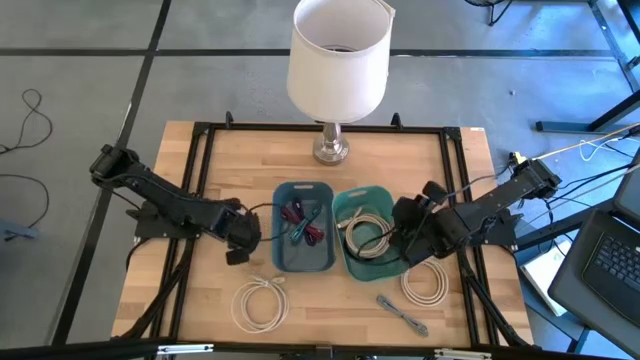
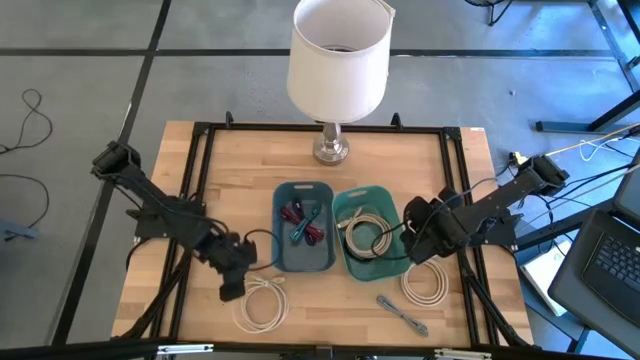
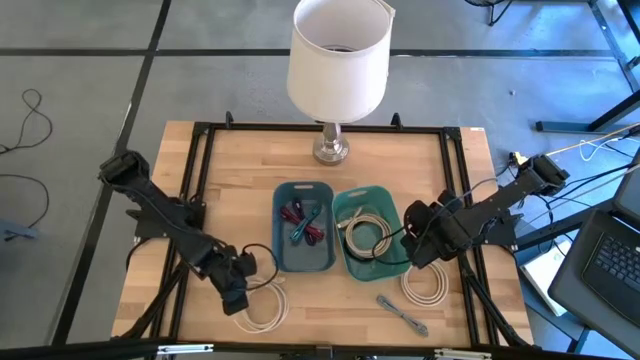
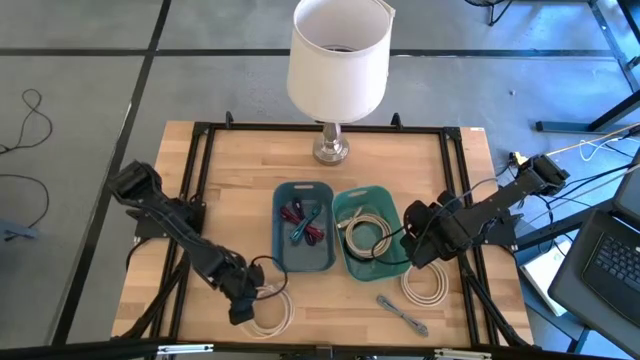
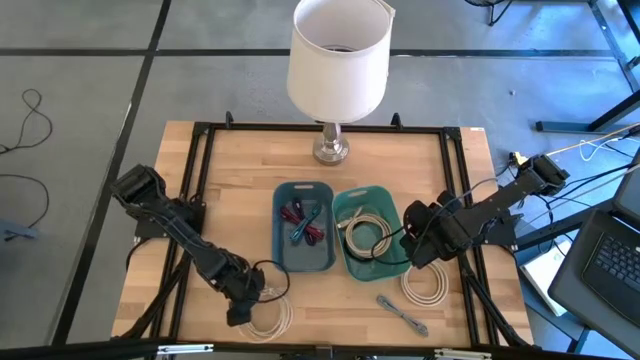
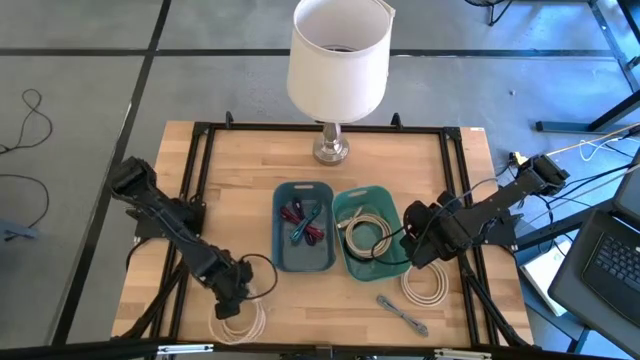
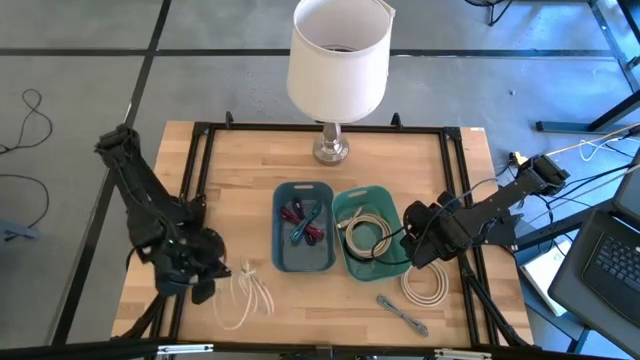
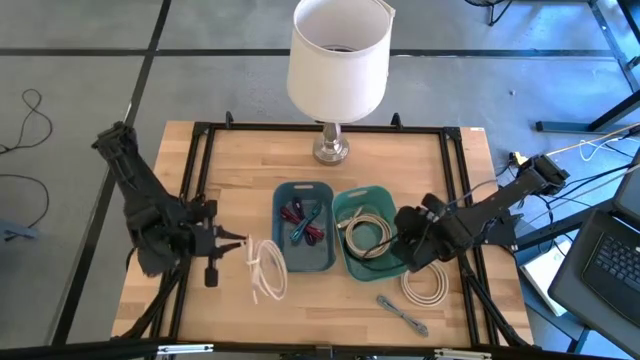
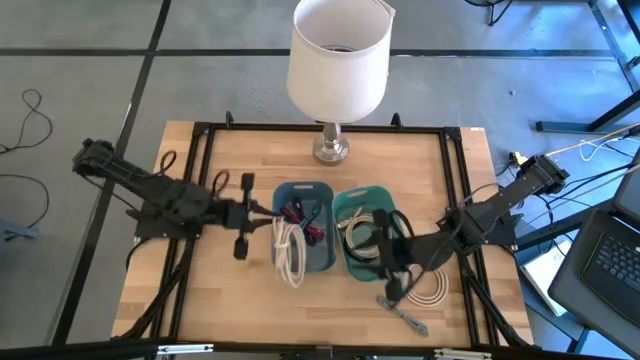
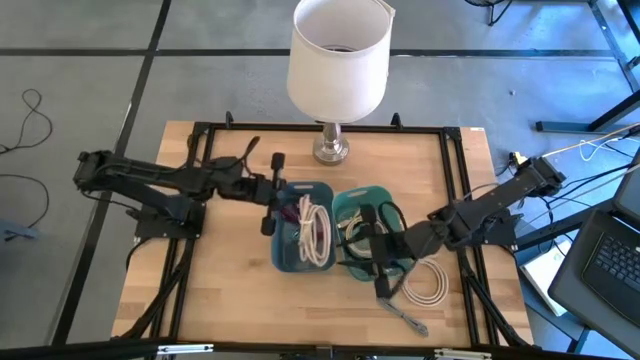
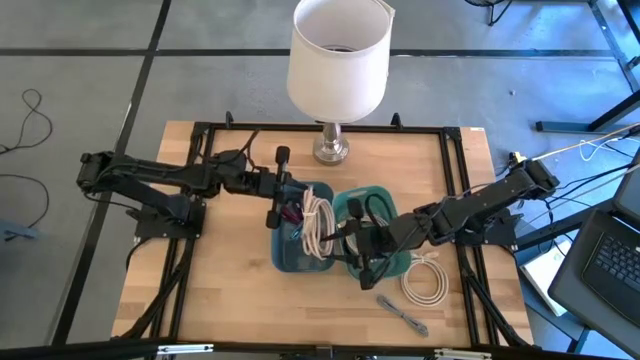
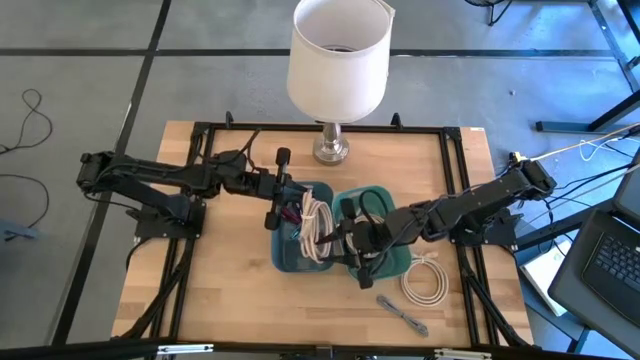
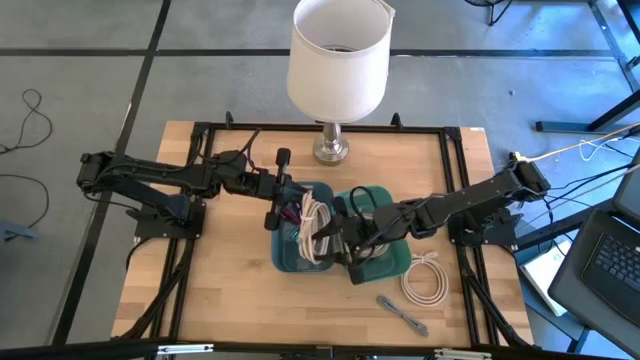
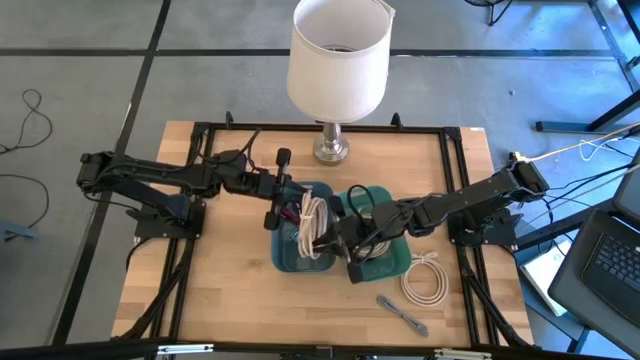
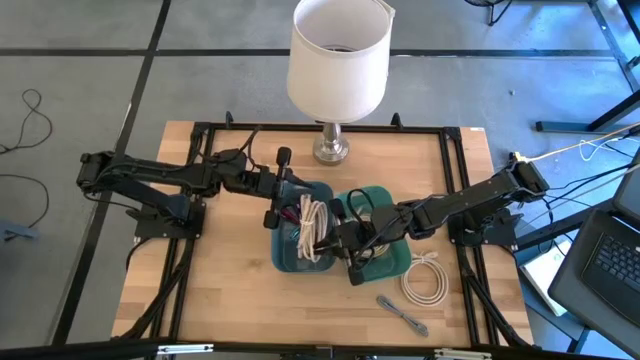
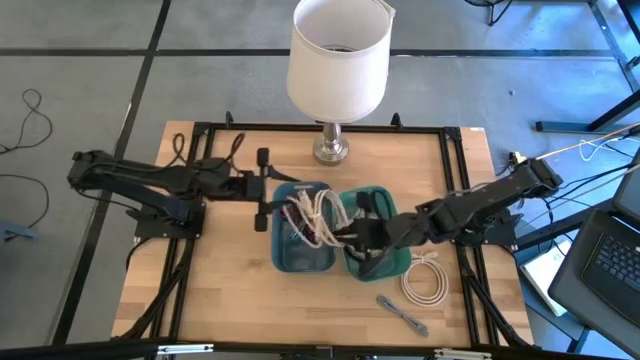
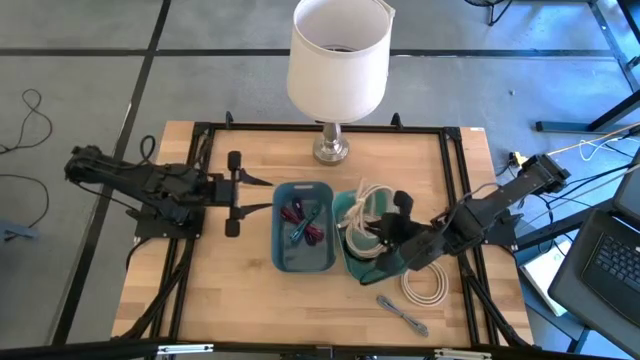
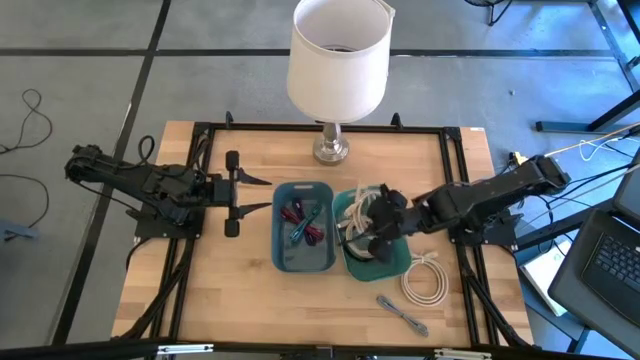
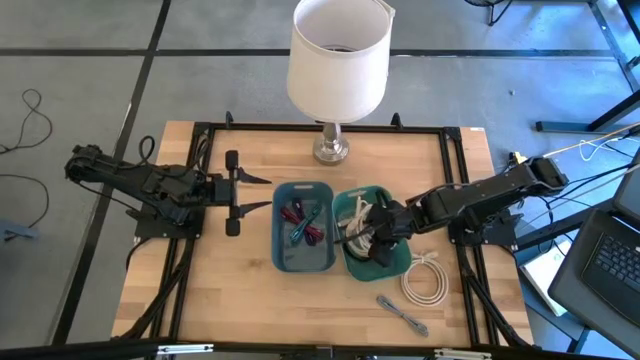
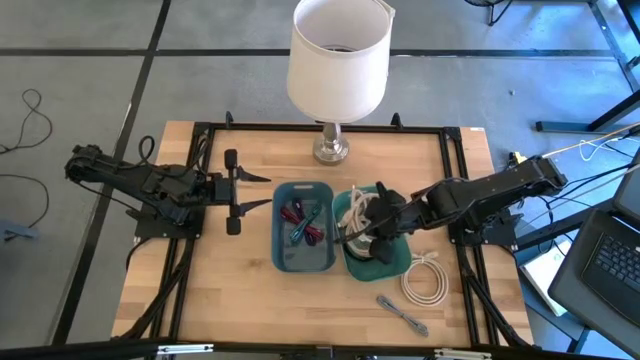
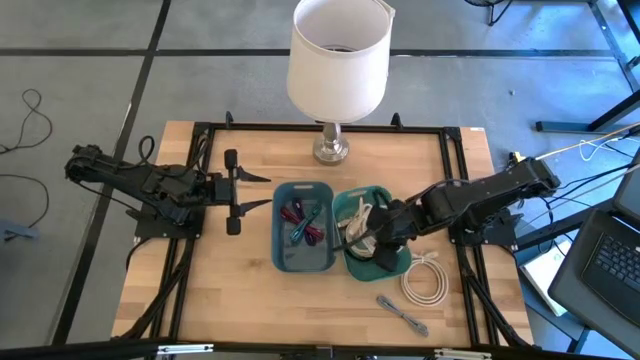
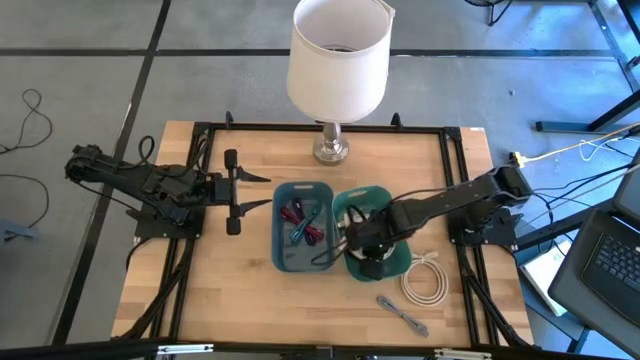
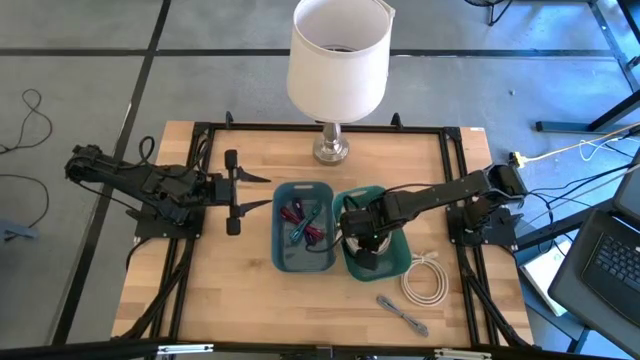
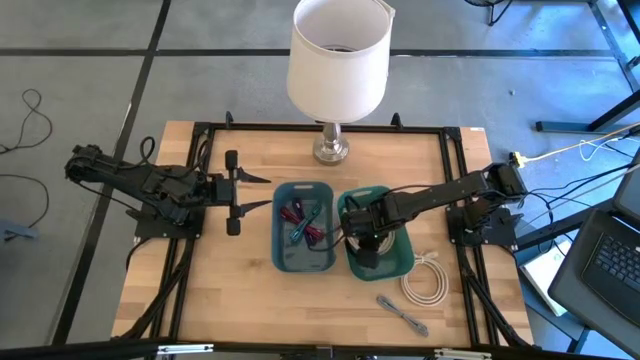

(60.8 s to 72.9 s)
Task: Pick and place items into bin
Put the left white HDMI cable into the green bin

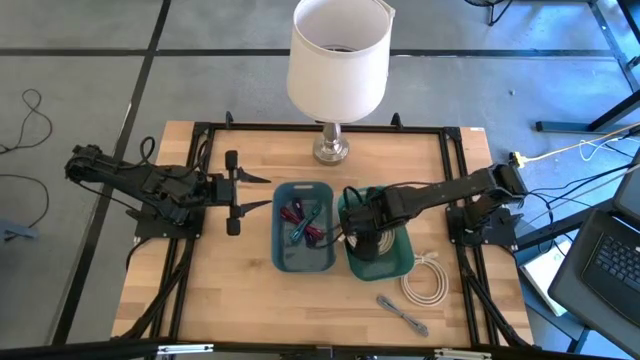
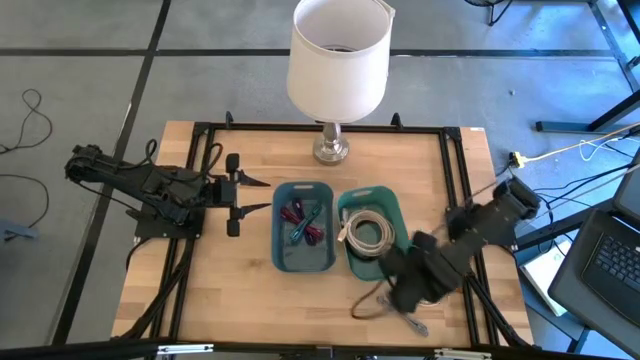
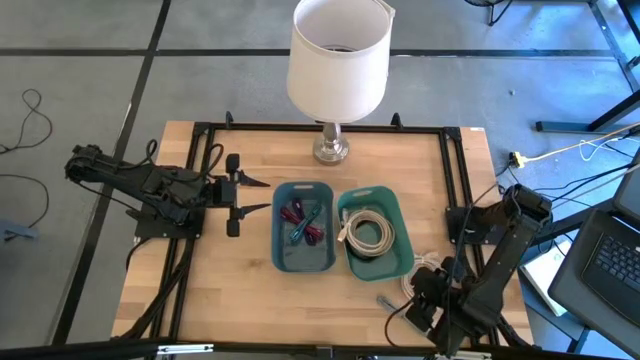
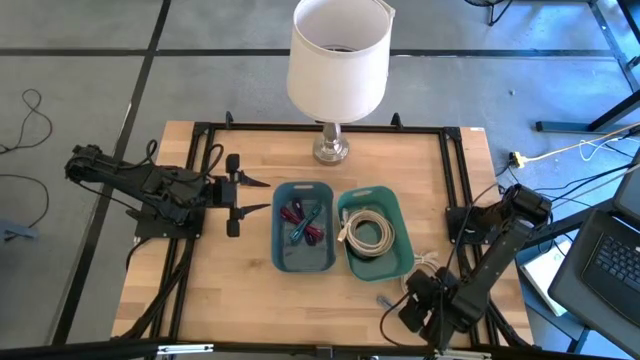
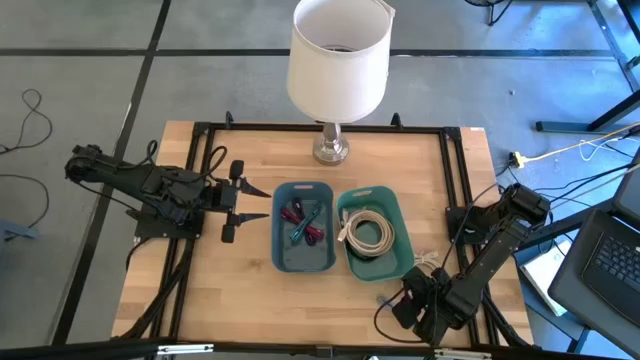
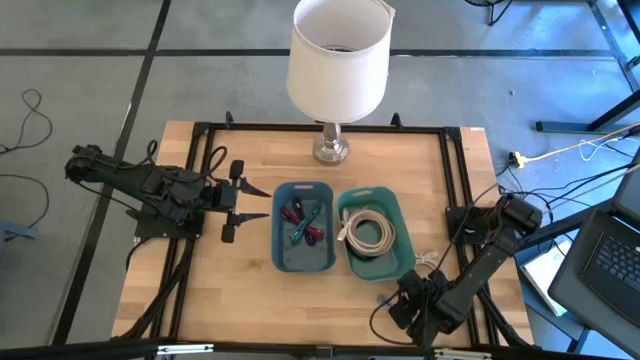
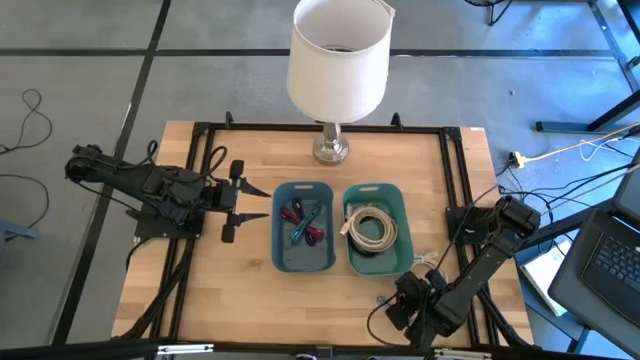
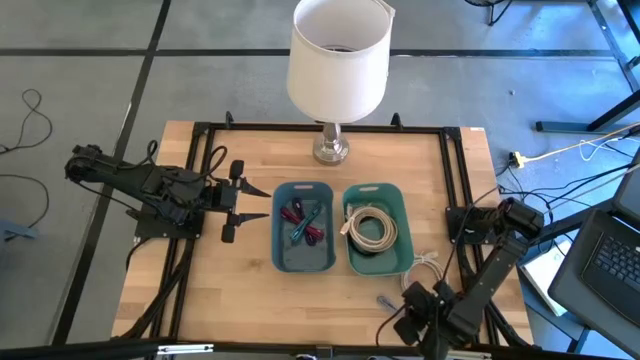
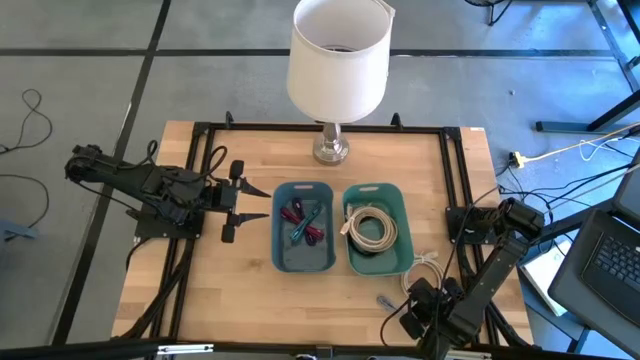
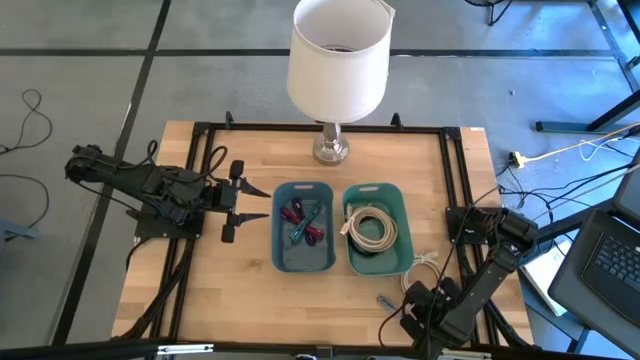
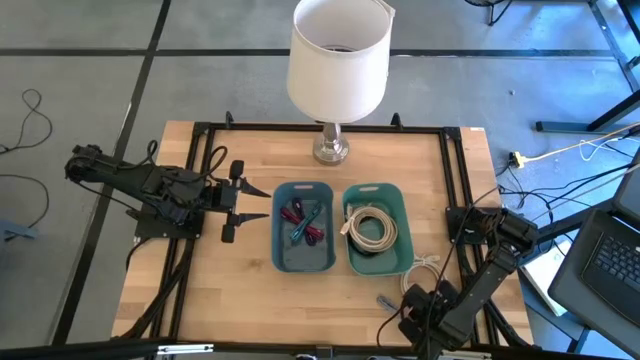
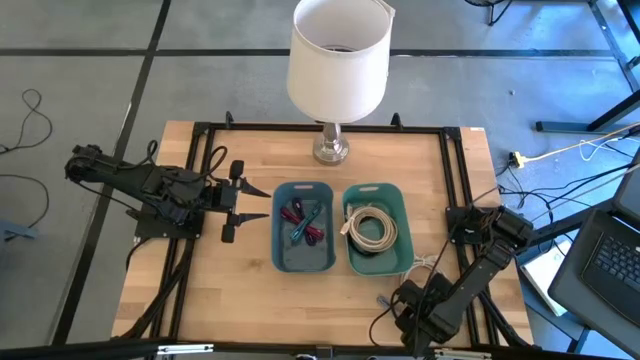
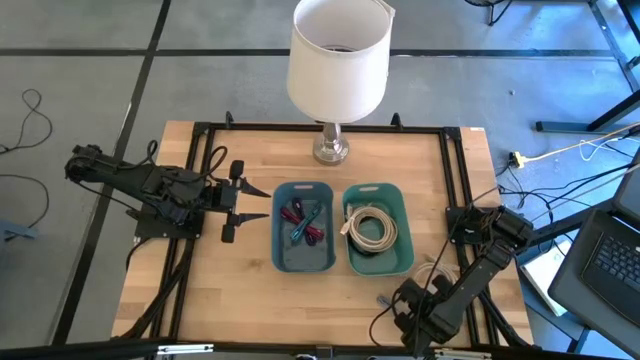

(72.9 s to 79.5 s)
Put the white HDMI cable into the green bin

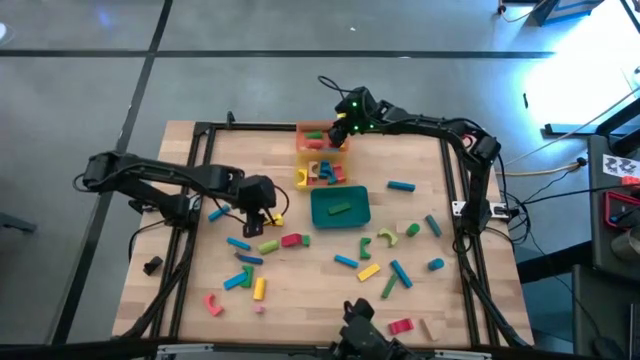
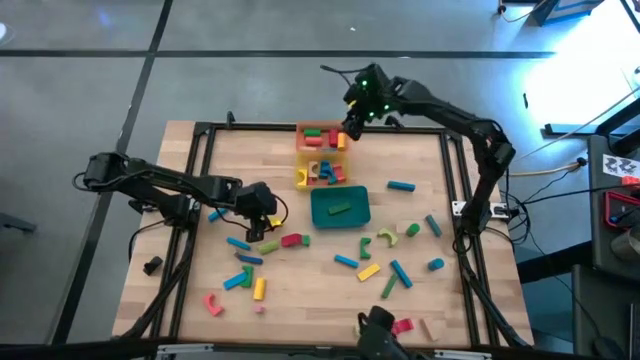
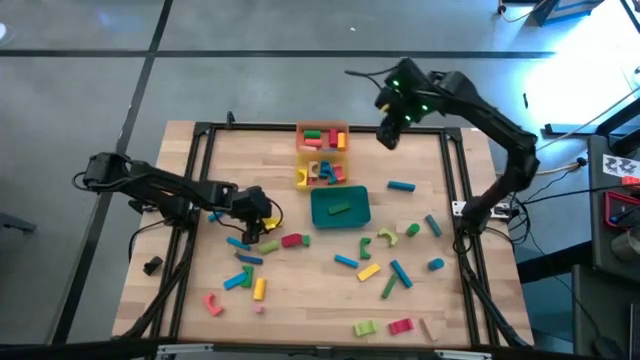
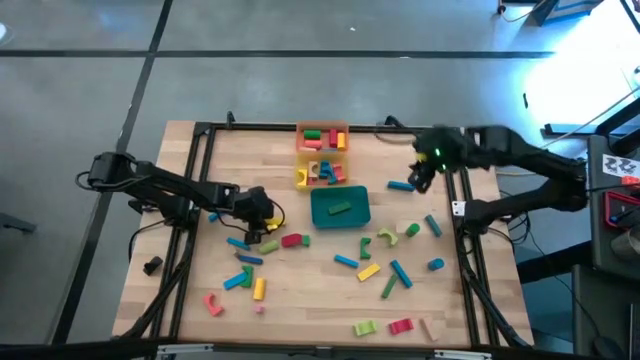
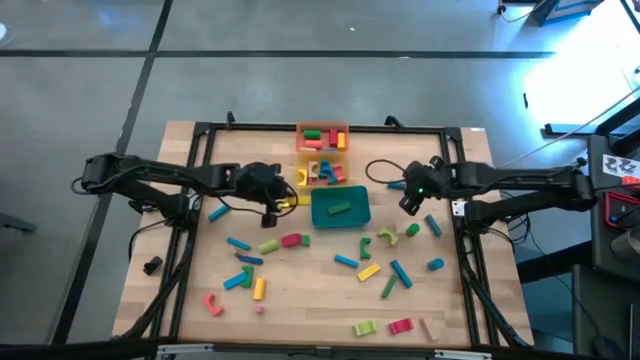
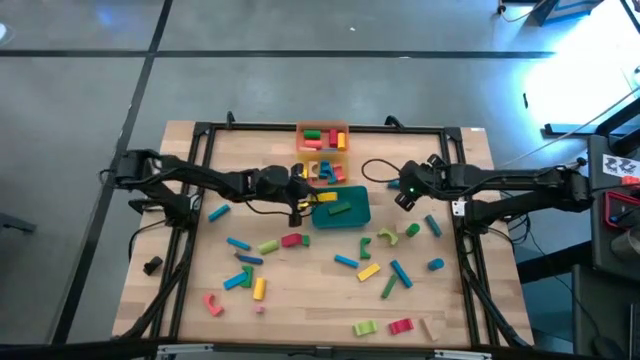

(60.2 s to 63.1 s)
Task: Sort blocks by size
Put the yellow rectangular block into the blue bin

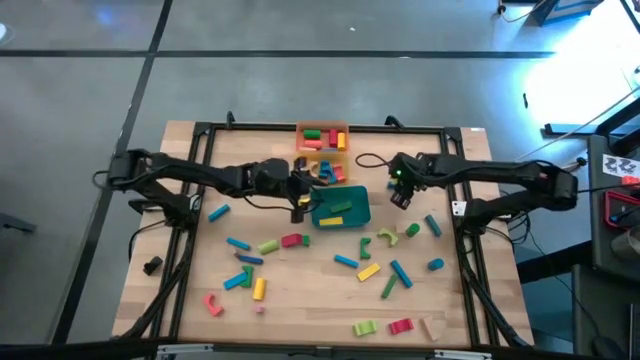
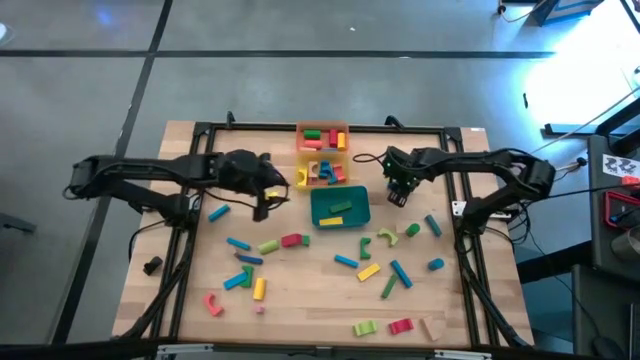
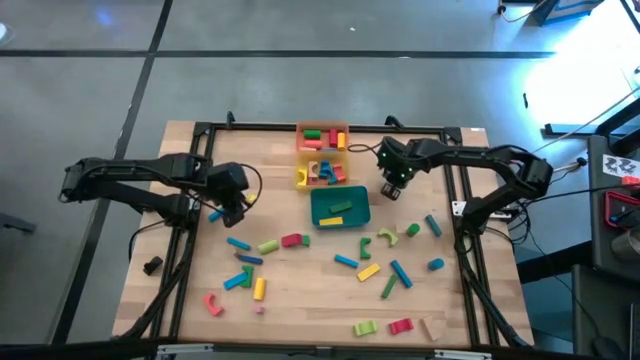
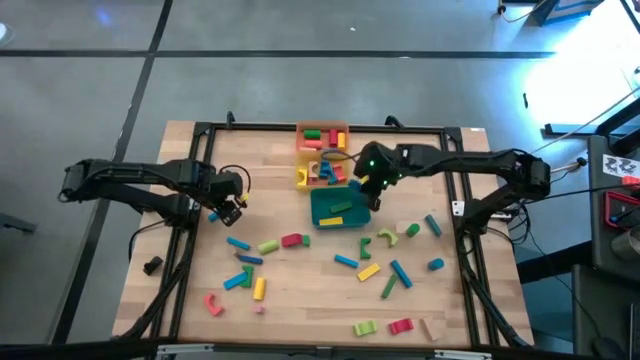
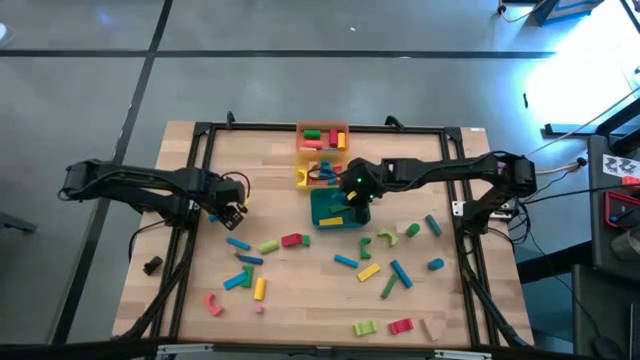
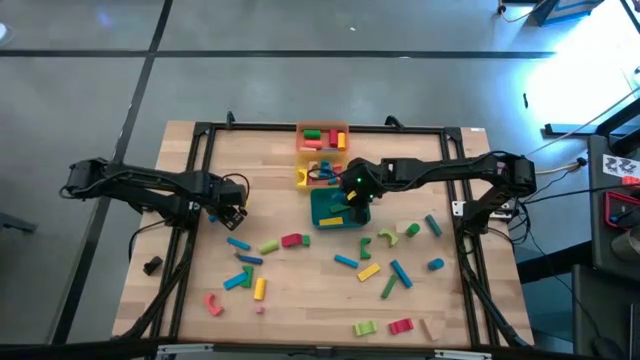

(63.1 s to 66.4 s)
Put the blue rectangular block into the blue bin
